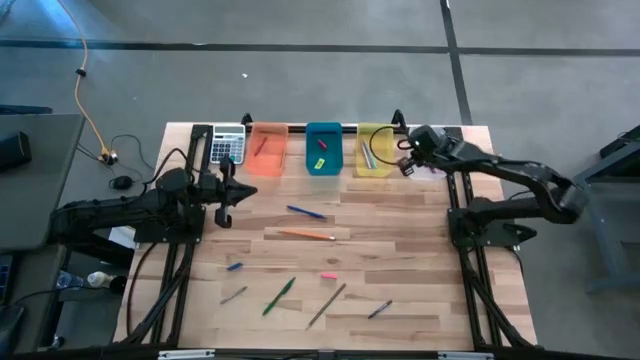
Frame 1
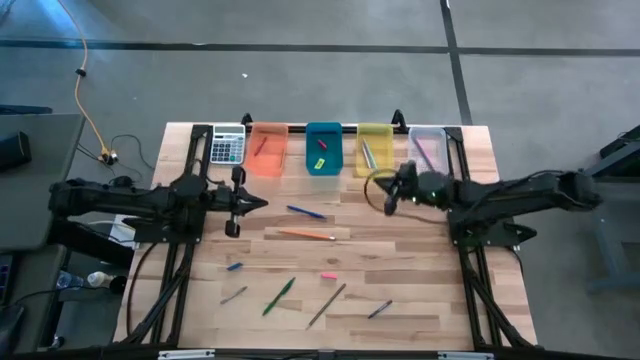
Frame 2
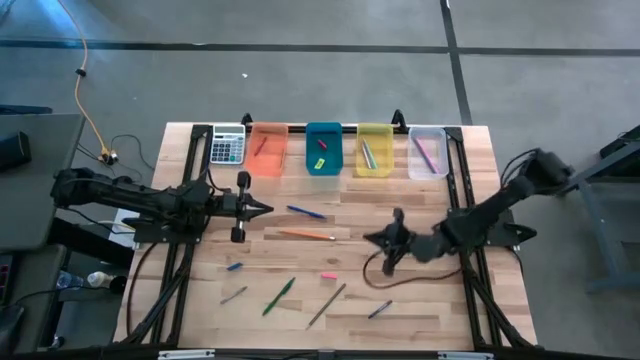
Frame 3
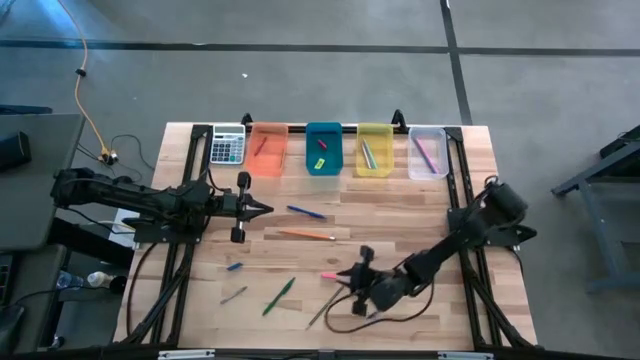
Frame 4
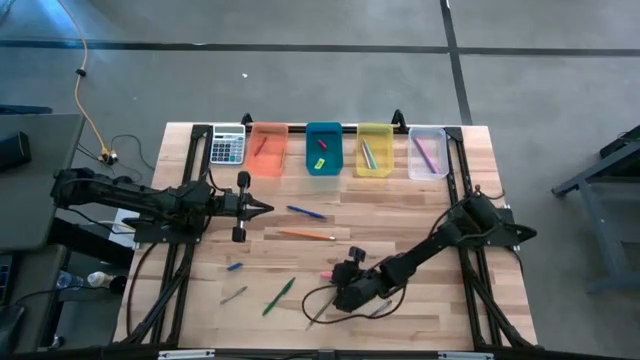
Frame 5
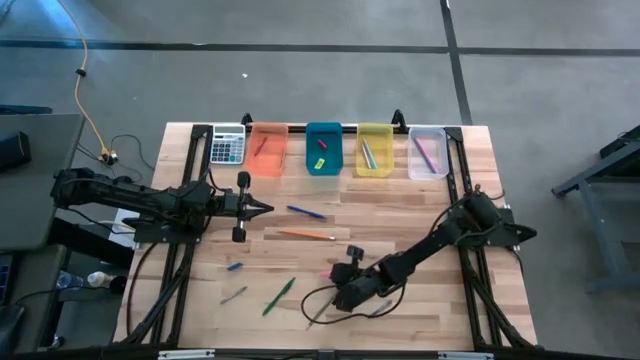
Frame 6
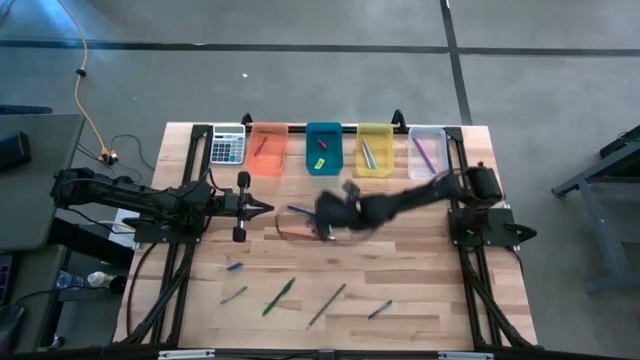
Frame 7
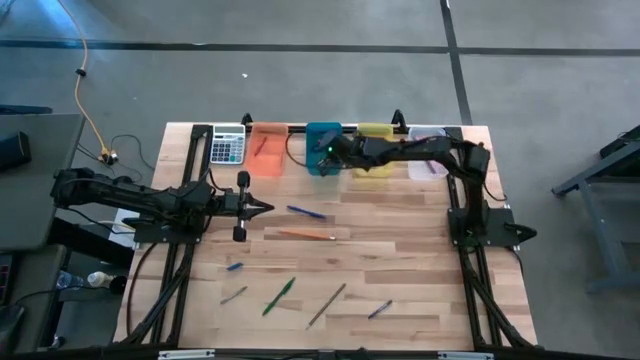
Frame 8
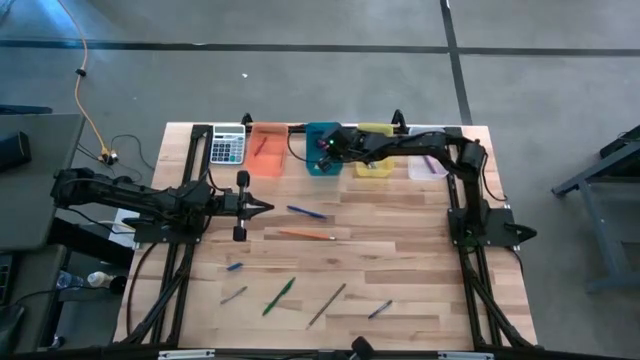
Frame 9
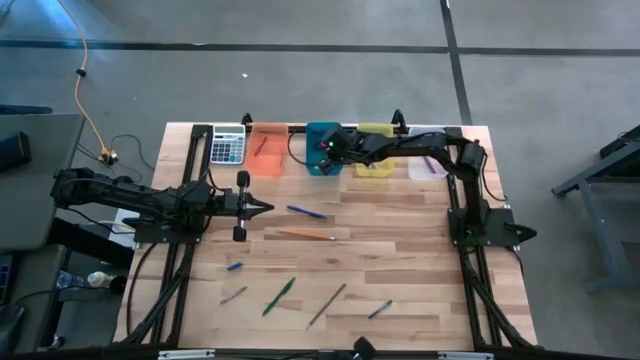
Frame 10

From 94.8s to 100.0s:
Task: Sort crayons/erasers/pens/pencils in bins
Put the pink eraser into the blue bin

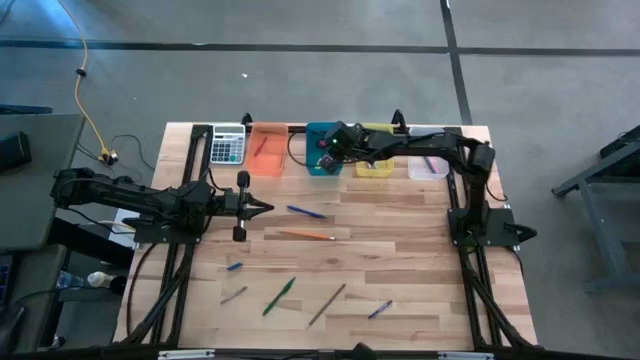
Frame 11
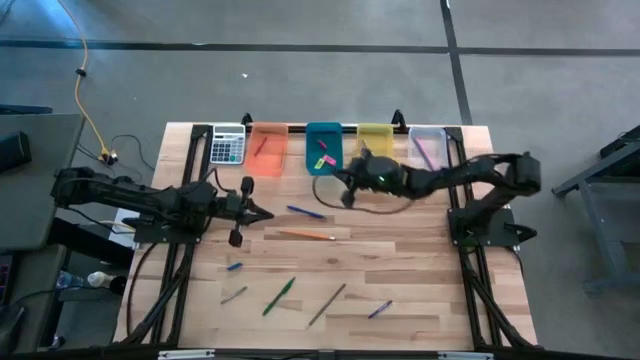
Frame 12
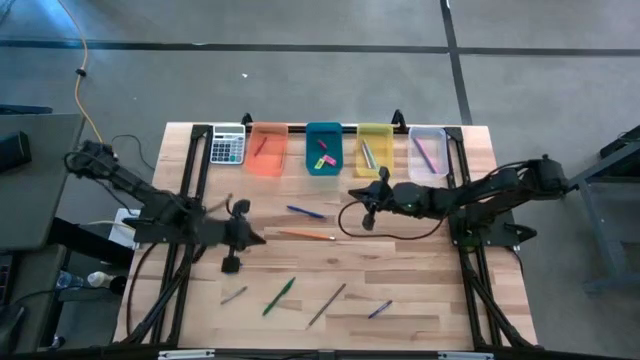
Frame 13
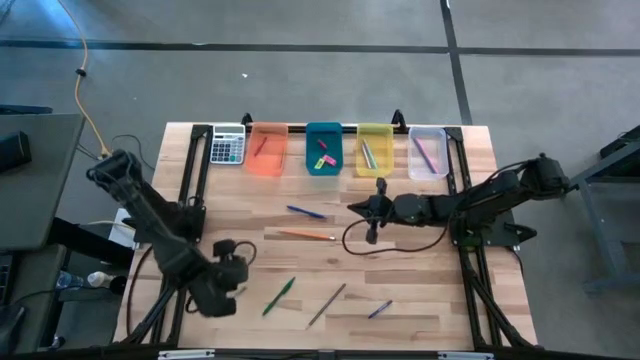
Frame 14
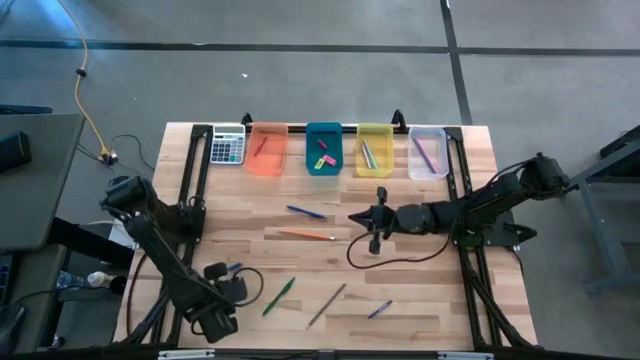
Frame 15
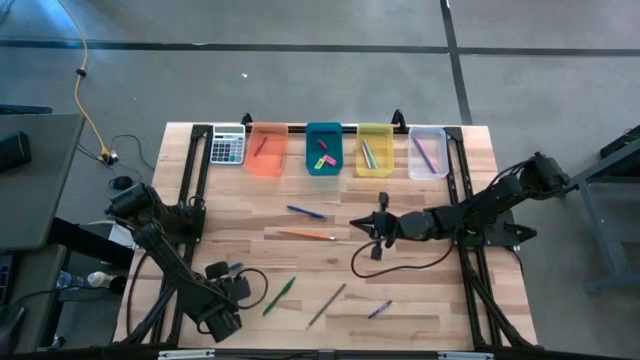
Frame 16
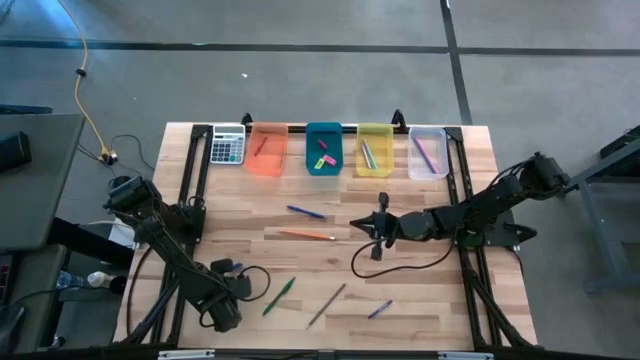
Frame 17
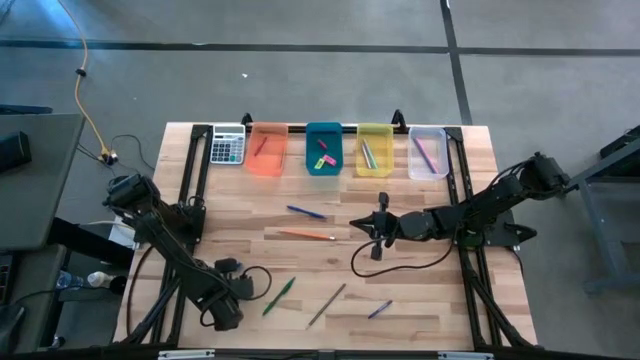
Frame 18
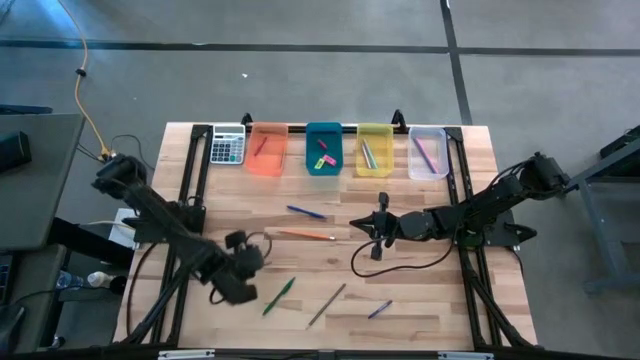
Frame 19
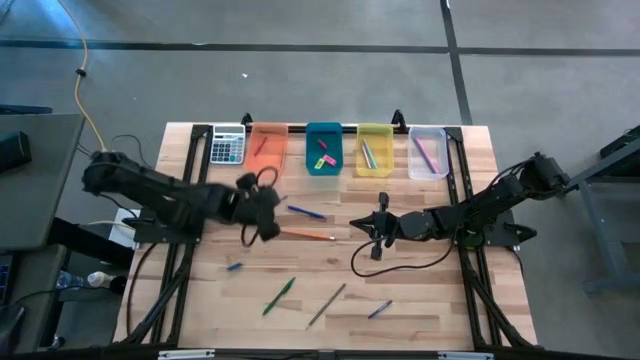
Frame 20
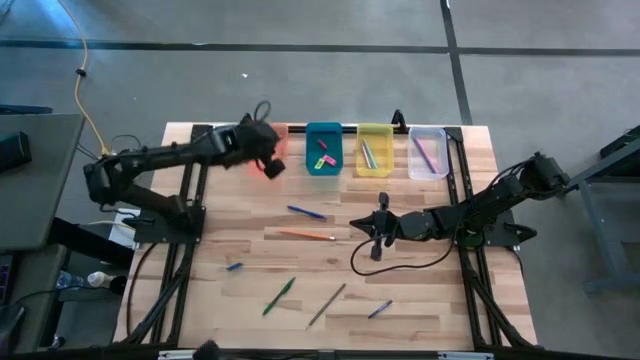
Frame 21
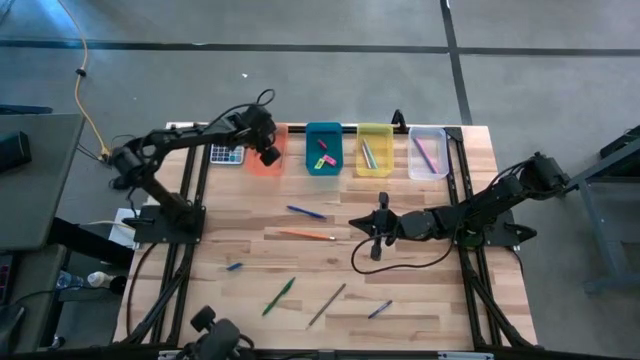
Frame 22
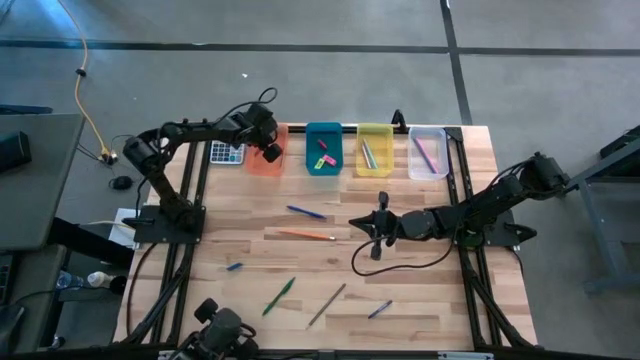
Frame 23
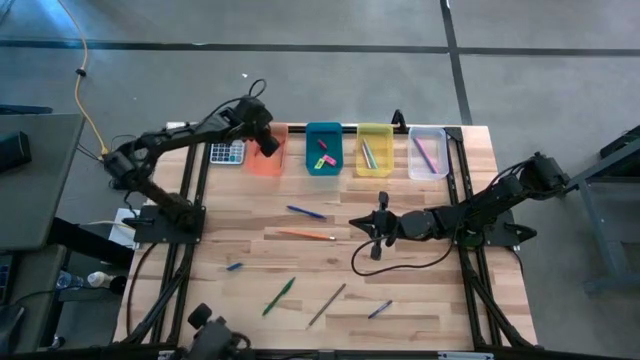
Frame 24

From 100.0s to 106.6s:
Put the grey crayon into the orange bin

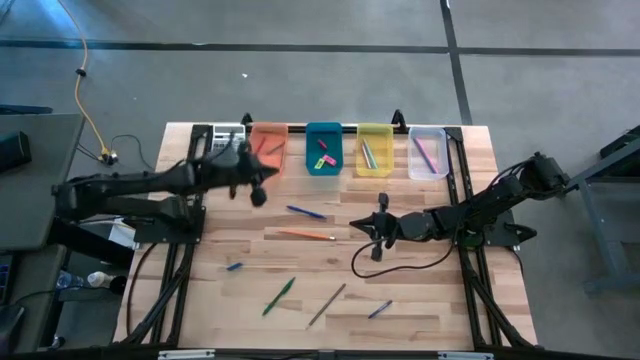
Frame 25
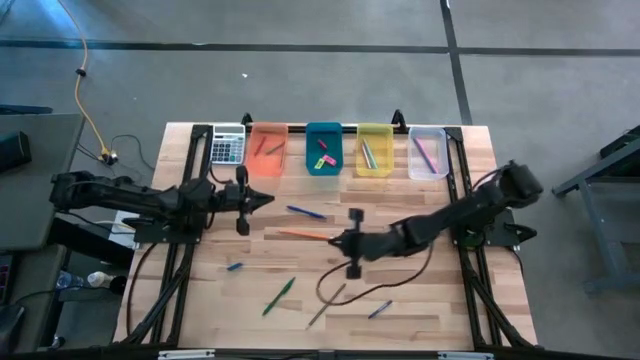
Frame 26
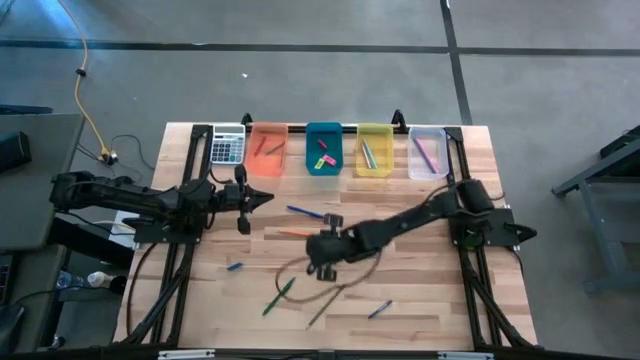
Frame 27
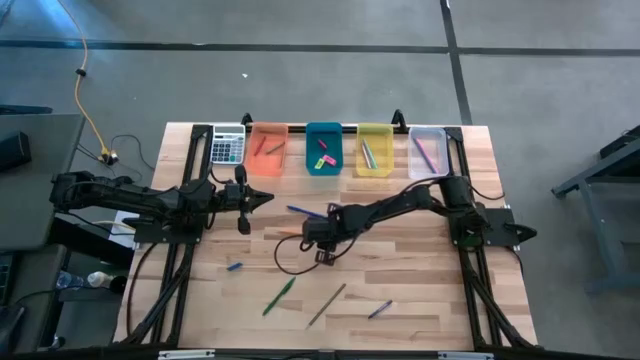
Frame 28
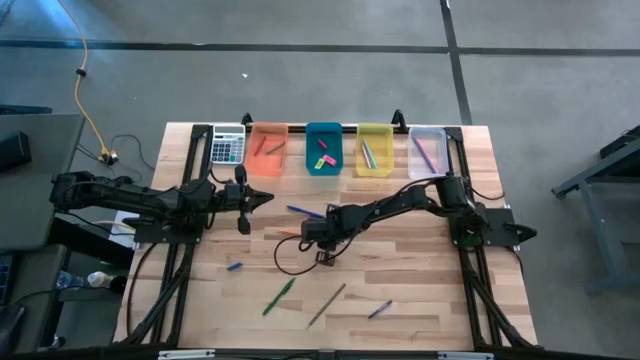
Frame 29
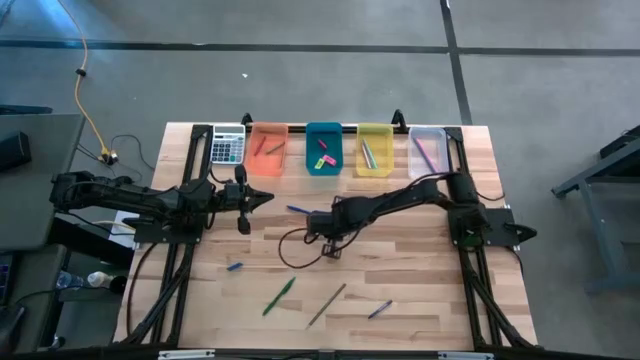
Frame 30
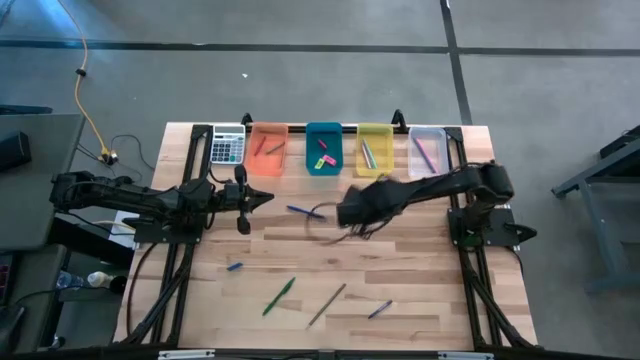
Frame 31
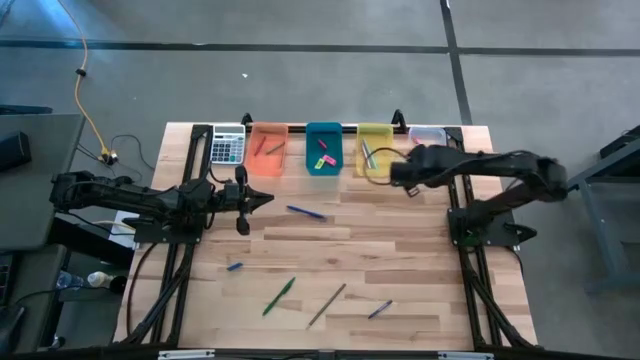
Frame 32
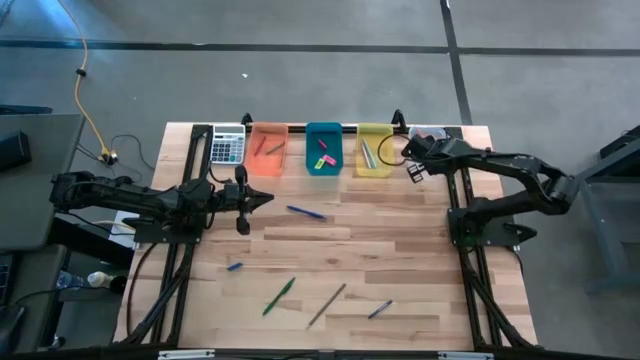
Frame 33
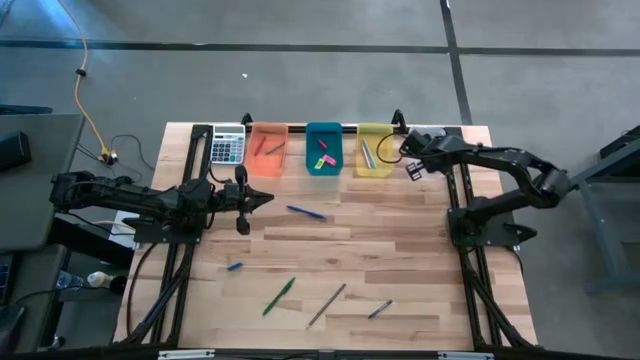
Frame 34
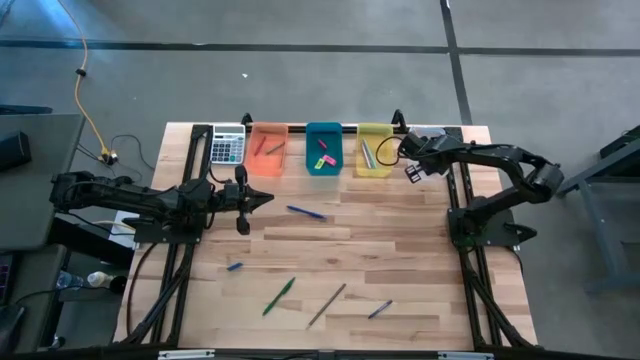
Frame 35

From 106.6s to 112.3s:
Put the orange pencil into the transparent bin

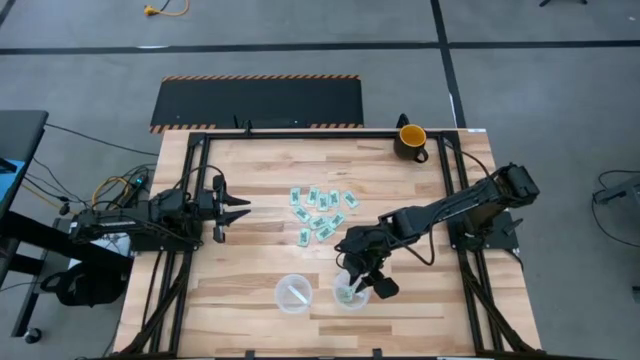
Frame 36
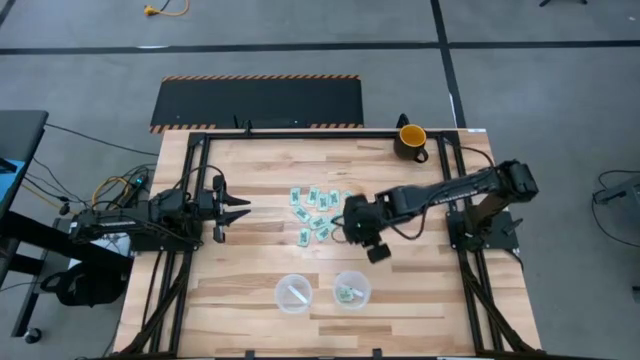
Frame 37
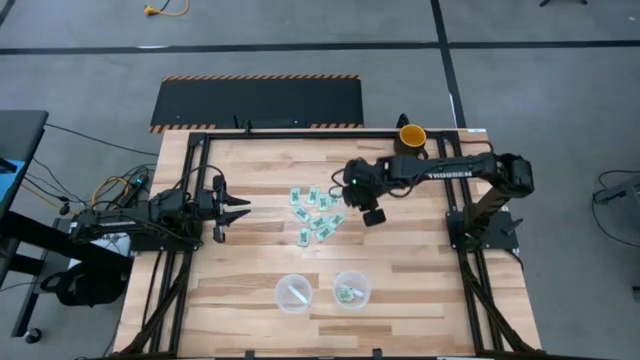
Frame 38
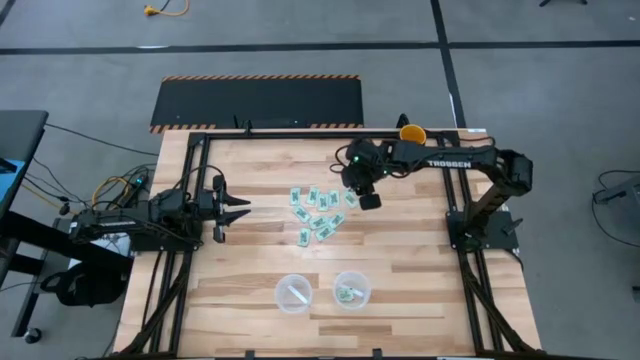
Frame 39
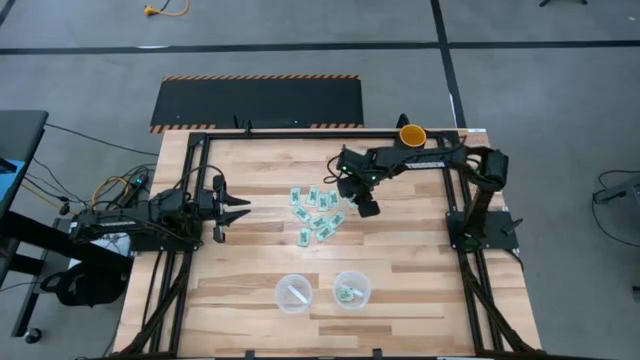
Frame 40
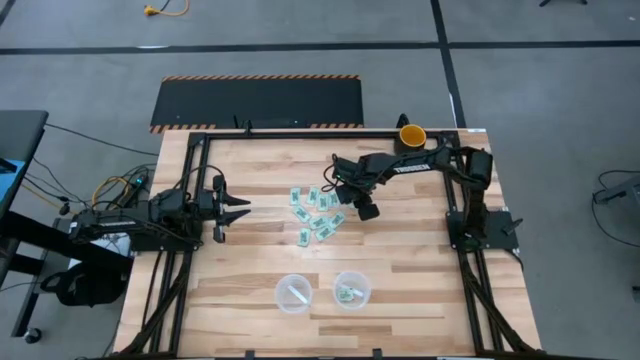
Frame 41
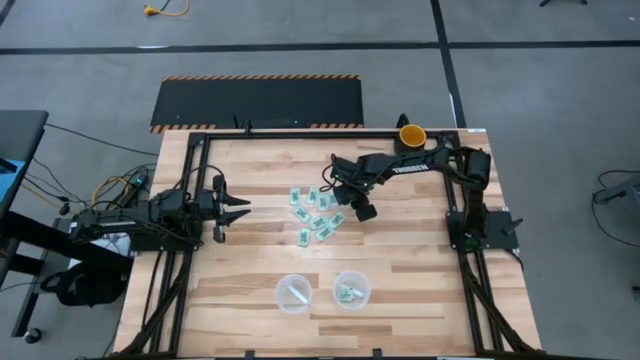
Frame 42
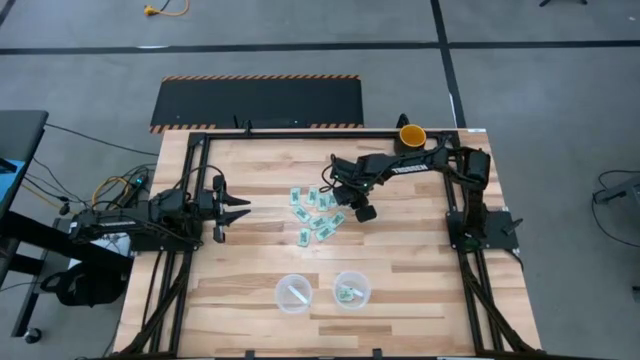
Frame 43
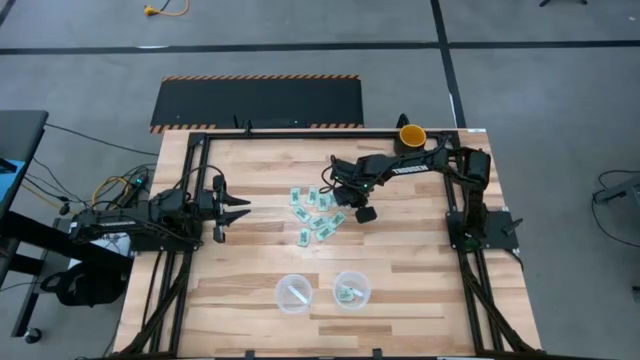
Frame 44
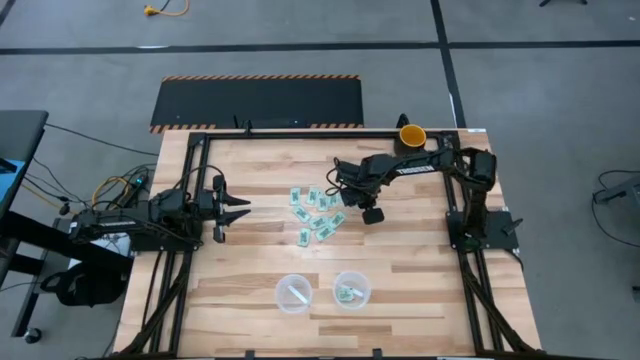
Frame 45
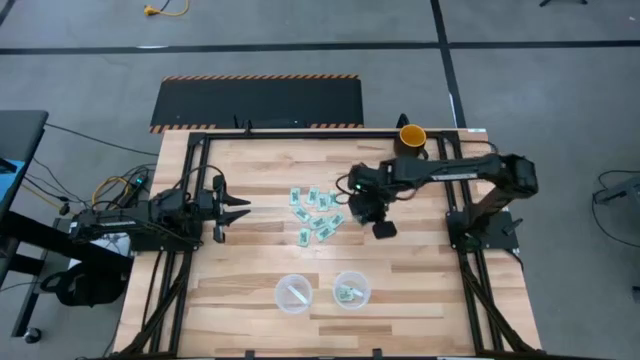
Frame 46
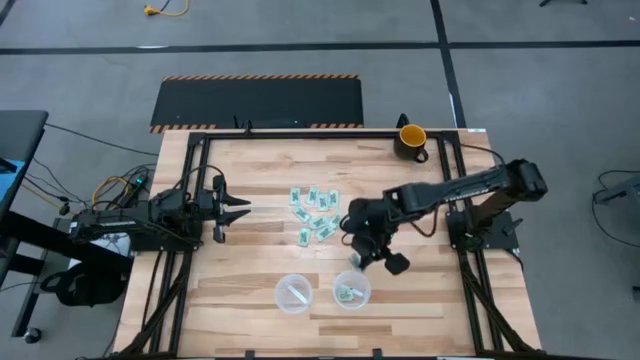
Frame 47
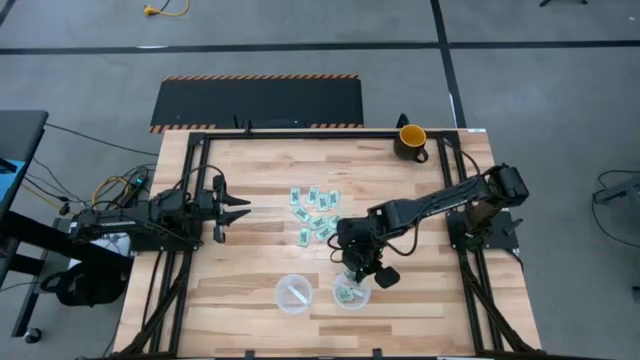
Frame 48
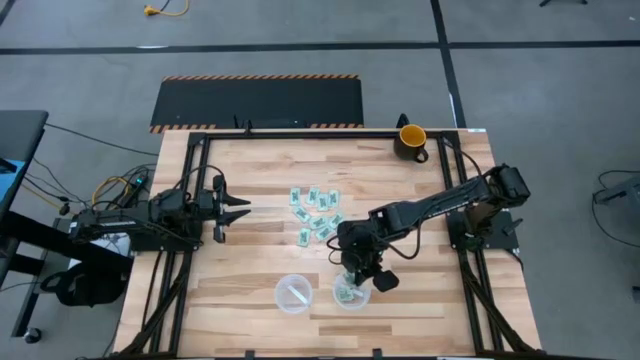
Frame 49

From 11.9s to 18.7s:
Task: Pick and place Stevia / Truvia into bins
Put the white stevia pack into the right transparent basket
